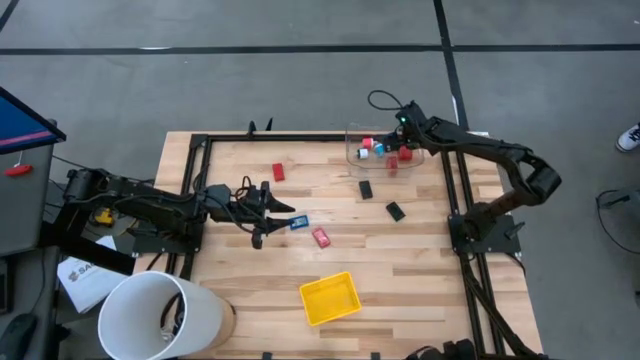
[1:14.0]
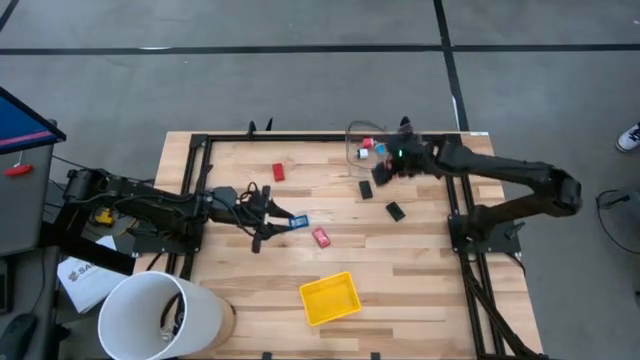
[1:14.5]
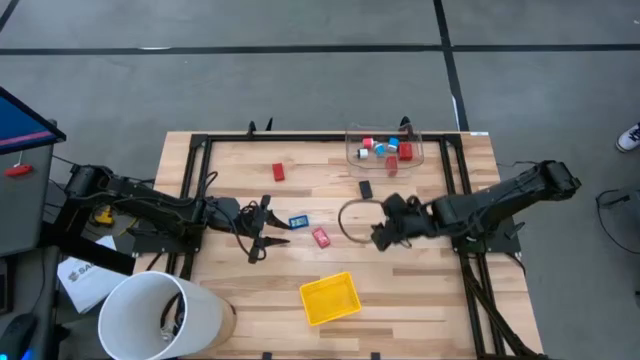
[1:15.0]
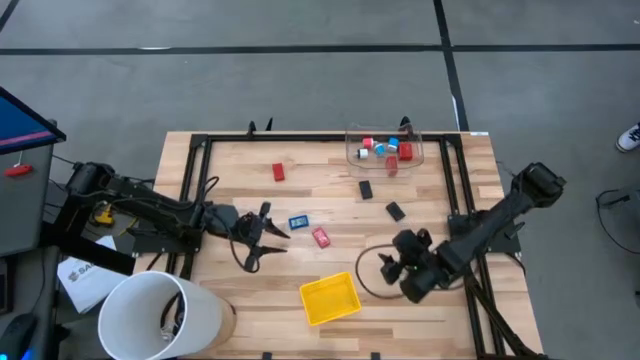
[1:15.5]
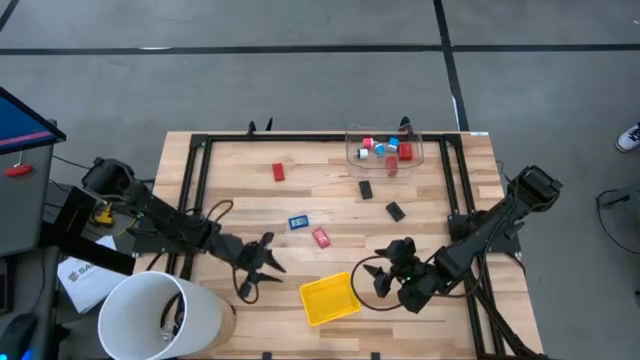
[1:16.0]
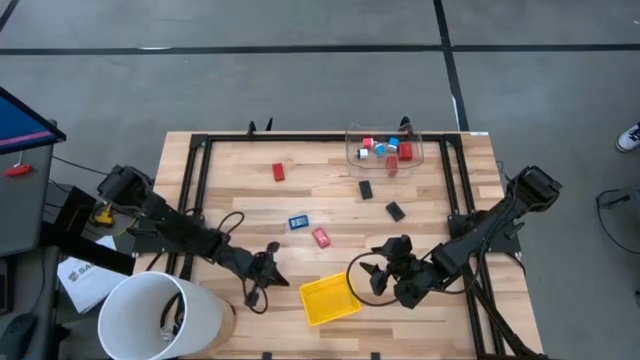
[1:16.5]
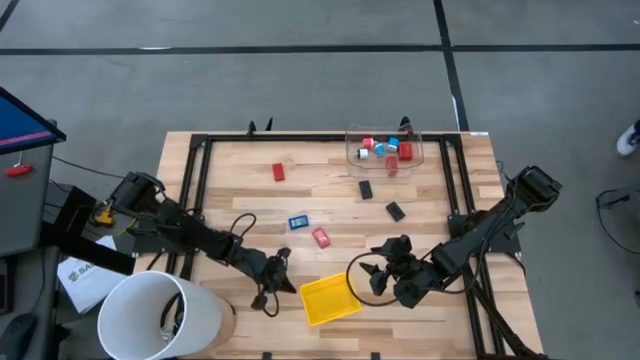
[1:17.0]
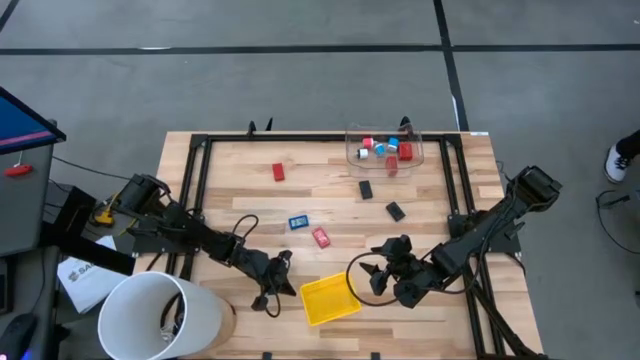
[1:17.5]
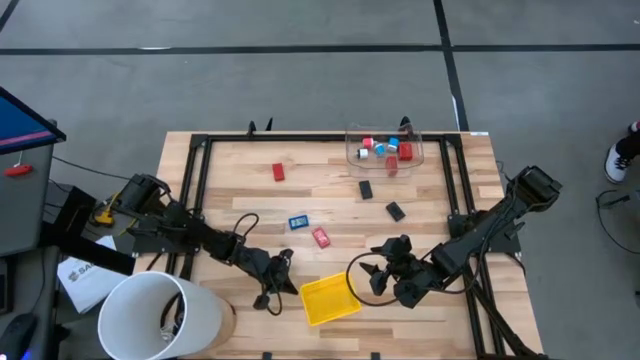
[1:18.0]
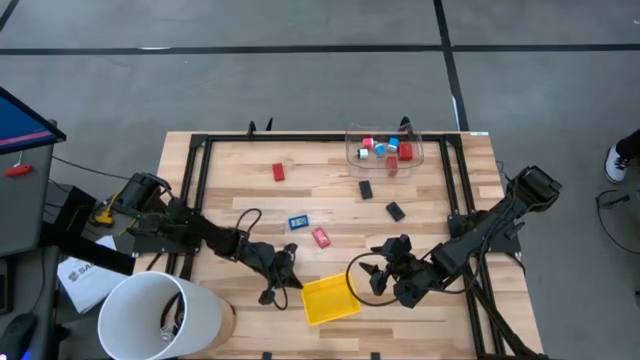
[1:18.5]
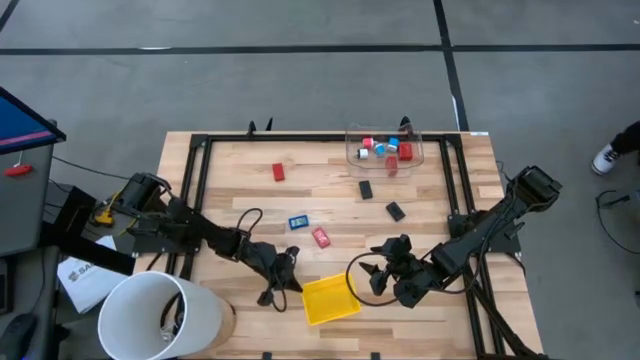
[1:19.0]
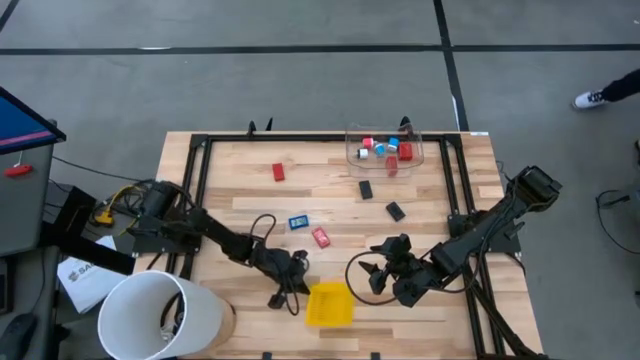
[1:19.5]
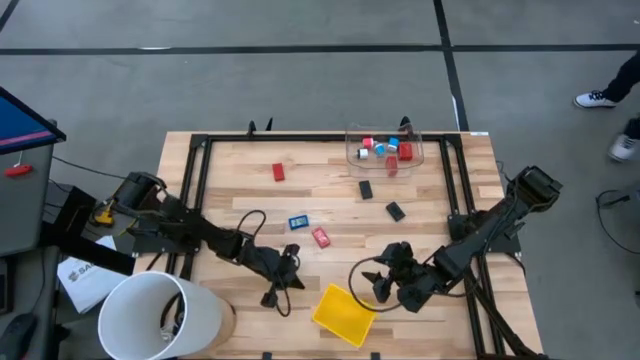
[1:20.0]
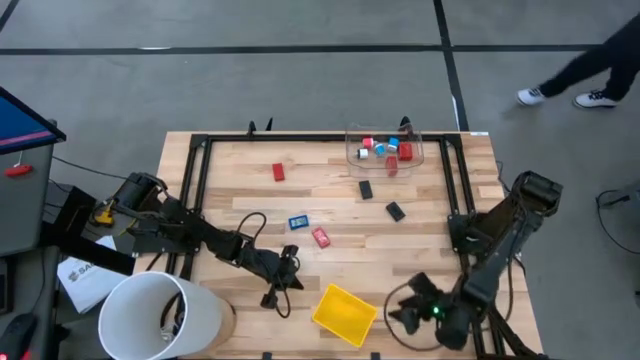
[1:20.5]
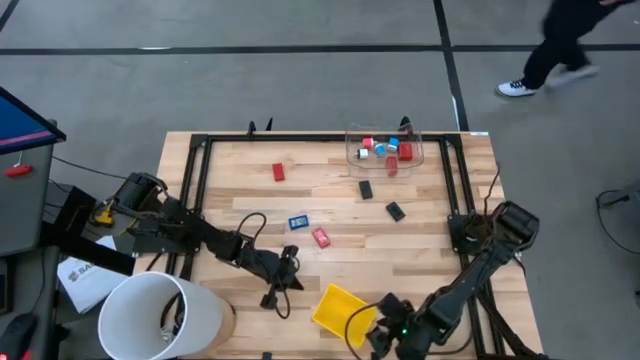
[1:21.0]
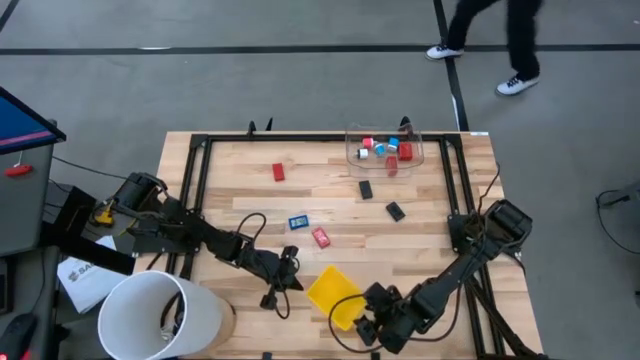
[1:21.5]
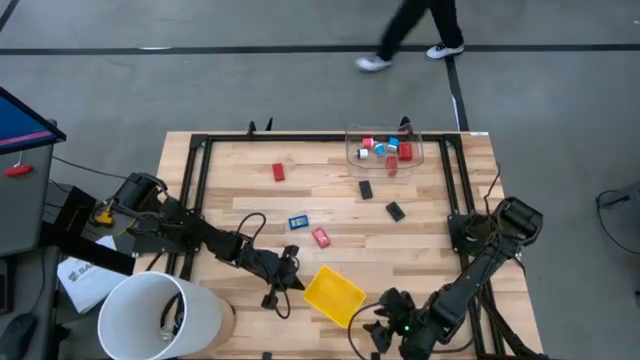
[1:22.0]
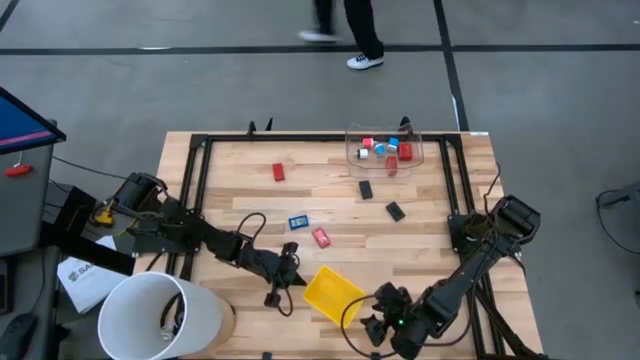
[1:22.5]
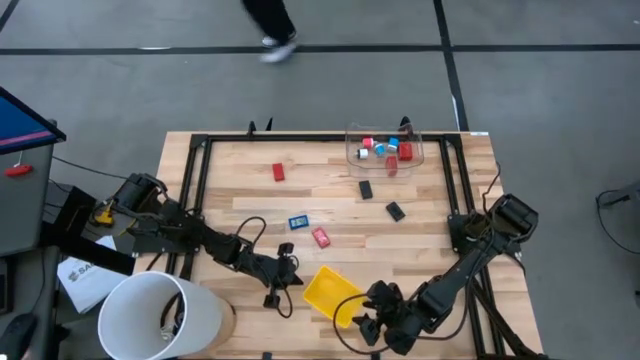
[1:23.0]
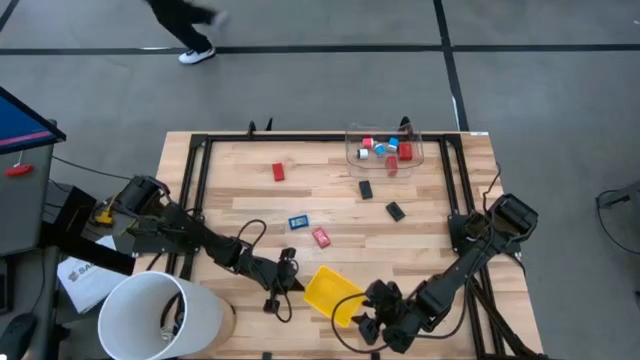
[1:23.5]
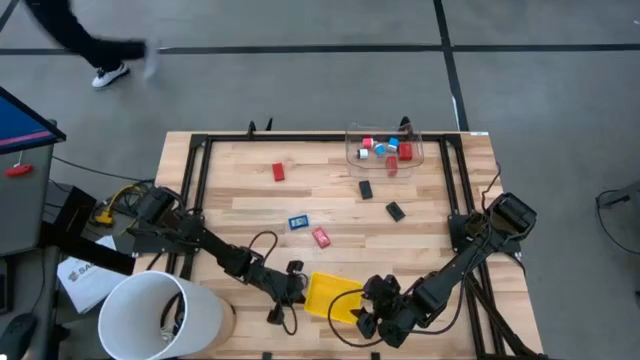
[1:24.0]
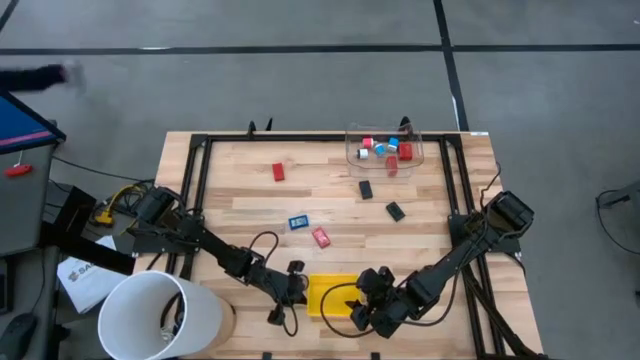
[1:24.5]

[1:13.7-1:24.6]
Task: Pick & Place Office items
Adjust the yellow bin slightly

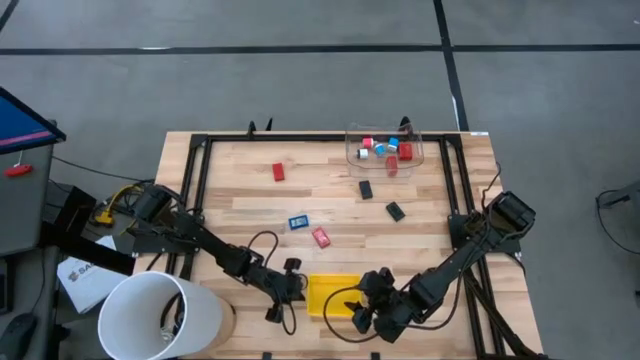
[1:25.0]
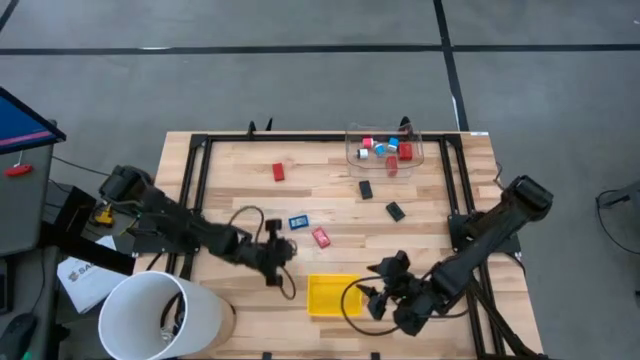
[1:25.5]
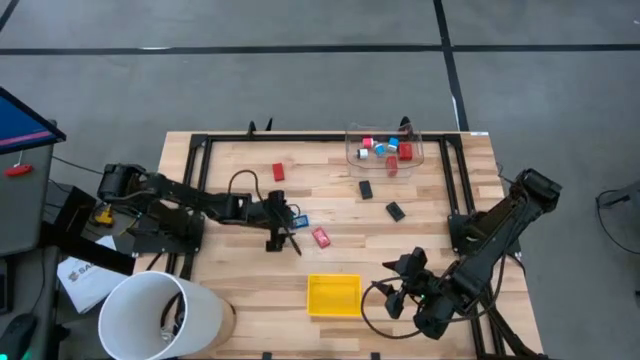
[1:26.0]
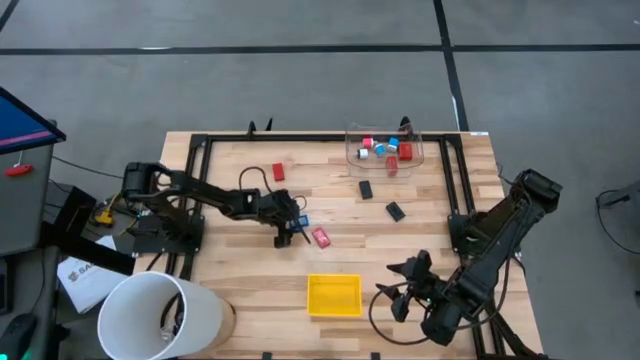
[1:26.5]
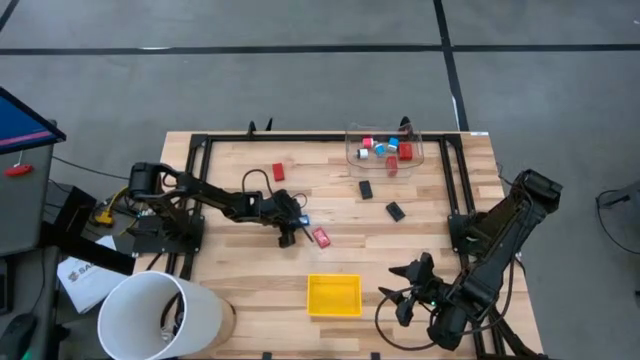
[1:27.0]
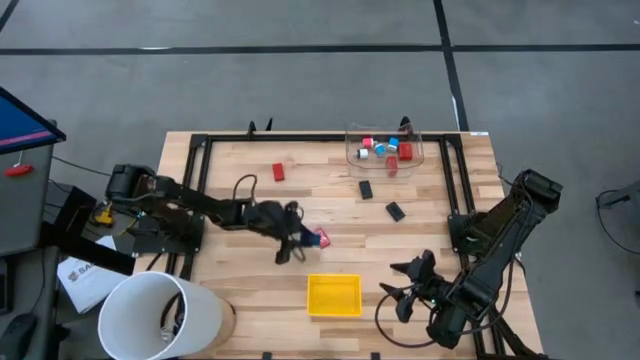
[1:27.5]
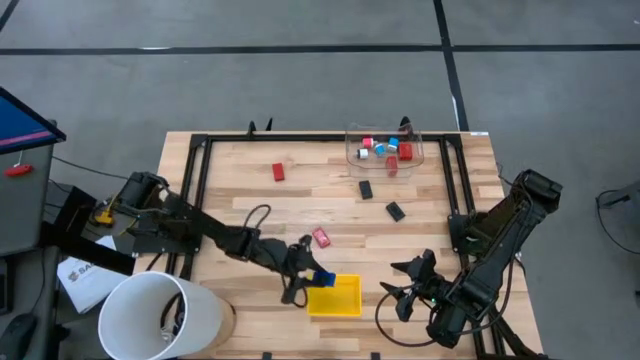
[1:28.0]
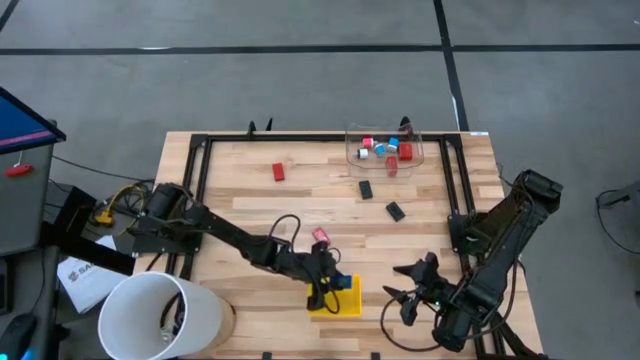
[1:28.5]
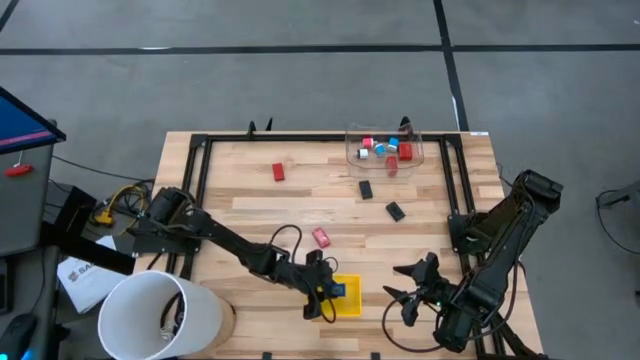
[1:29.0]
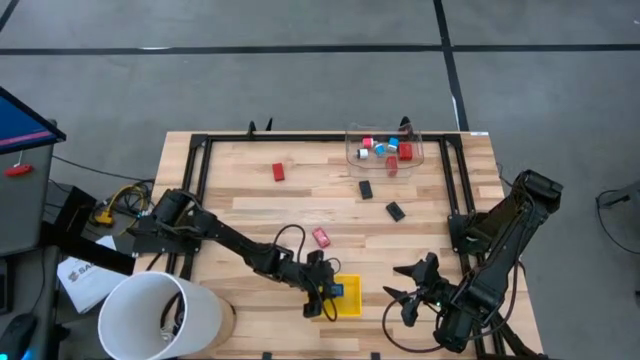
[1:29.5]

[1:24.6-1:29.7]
Put the blue digital clock into the yellow bin

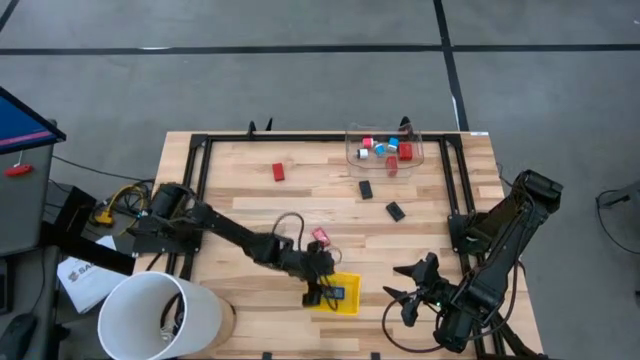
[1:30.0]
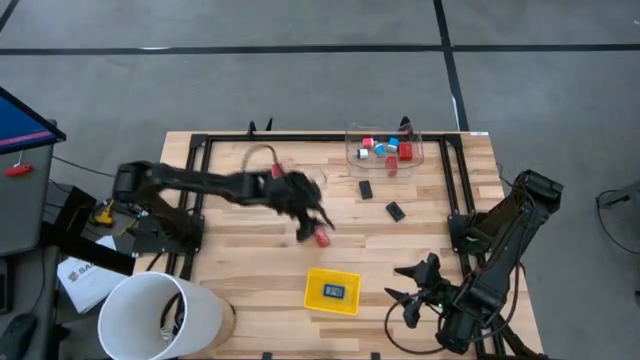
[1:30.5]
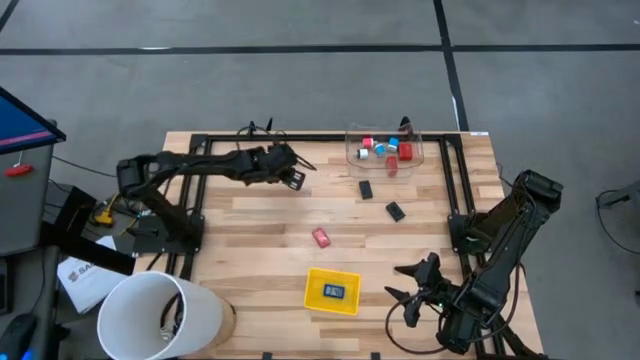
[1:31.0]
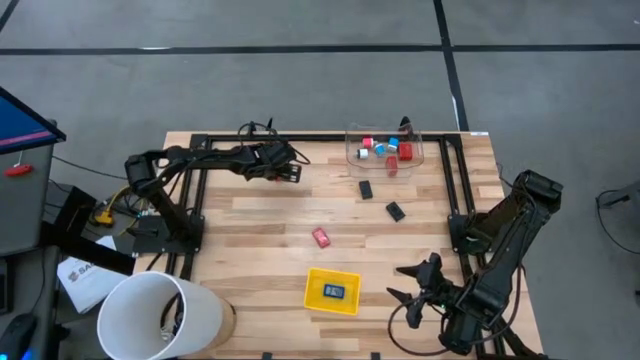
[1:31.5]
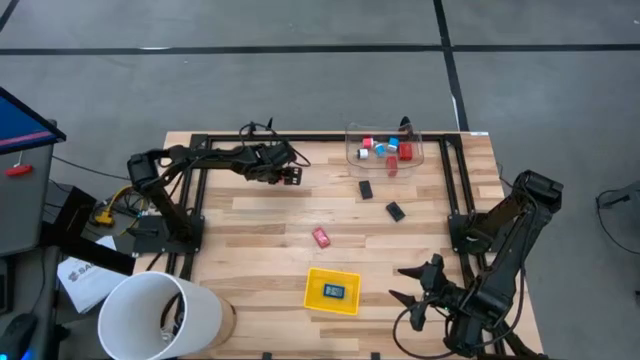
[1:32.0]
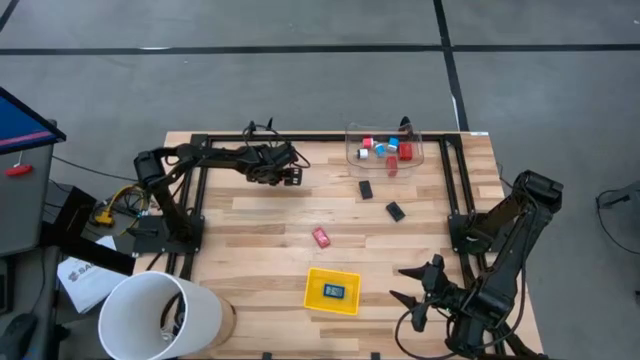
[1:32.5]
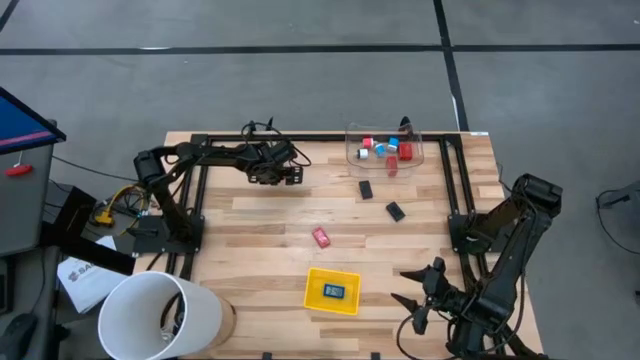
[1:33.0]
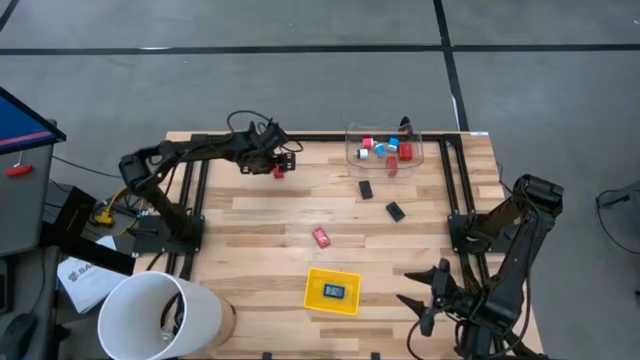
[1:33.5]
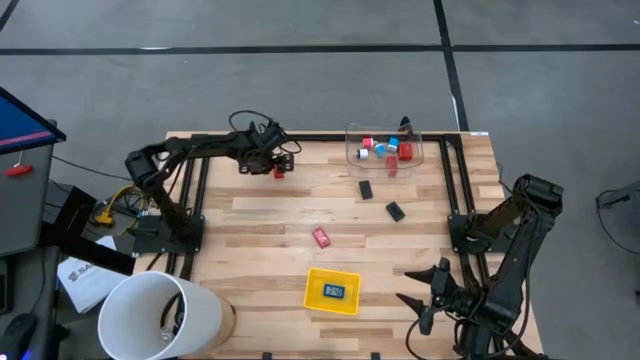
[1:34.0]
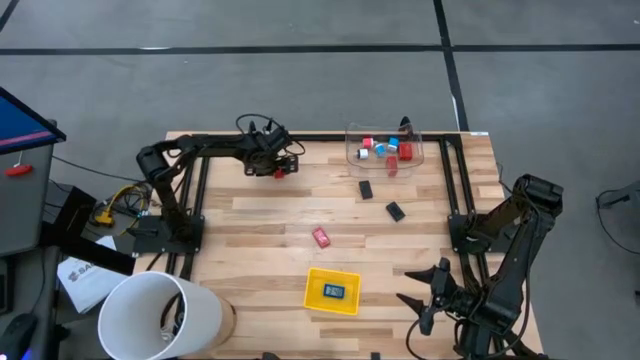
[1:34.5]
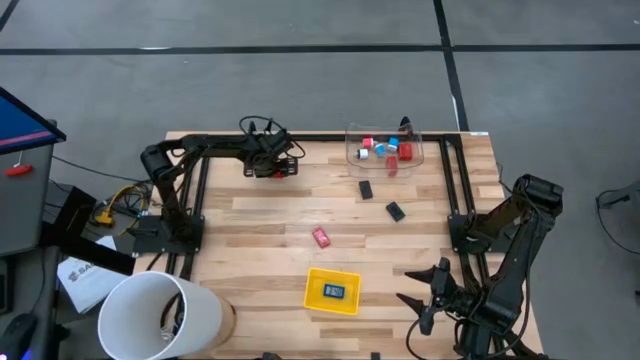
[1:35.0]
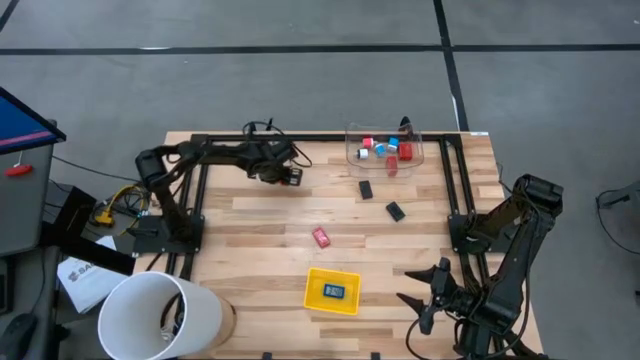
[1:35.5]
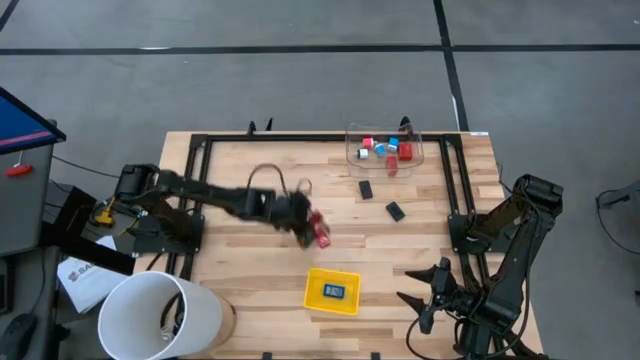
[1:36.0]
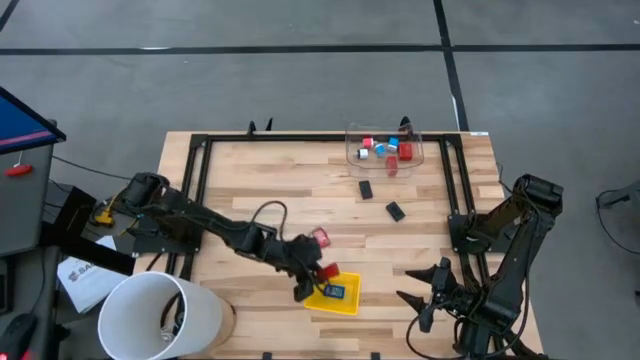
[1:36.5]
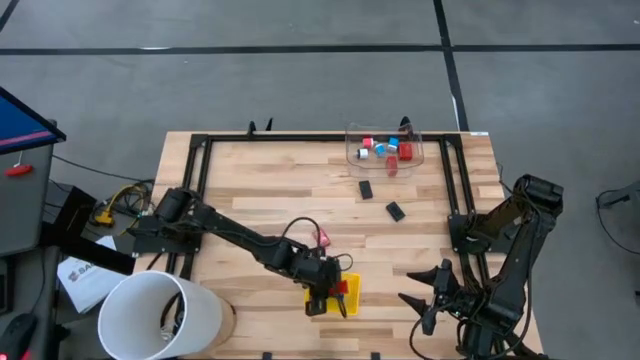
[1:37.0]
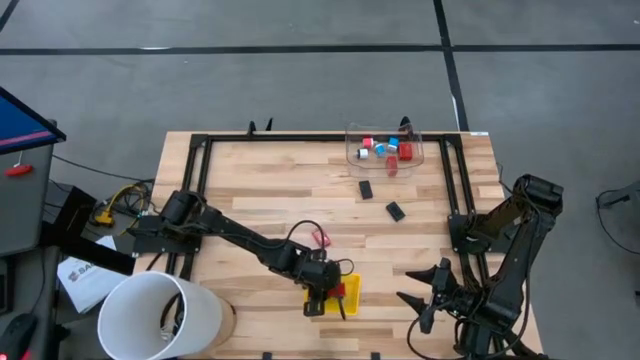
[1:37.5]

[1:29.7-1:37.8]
Put the top red digital clock into the yellow bin
